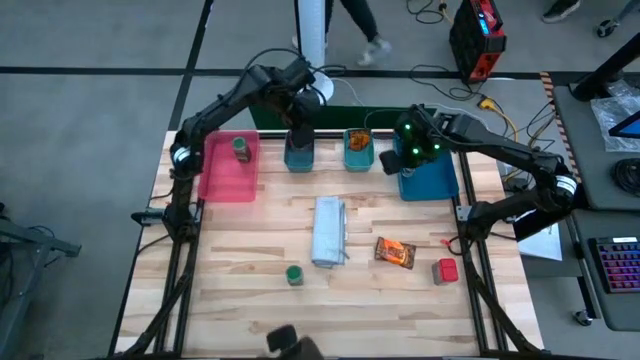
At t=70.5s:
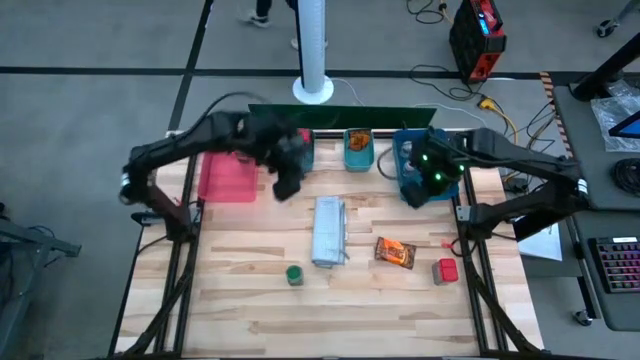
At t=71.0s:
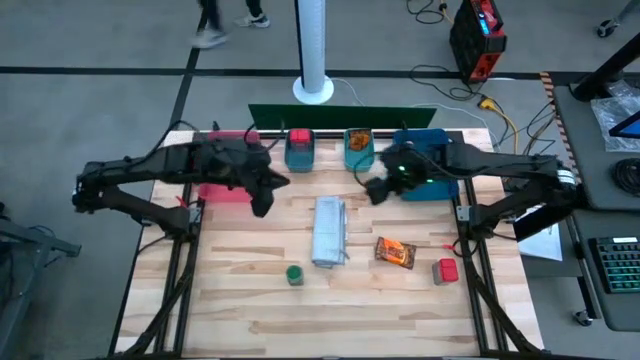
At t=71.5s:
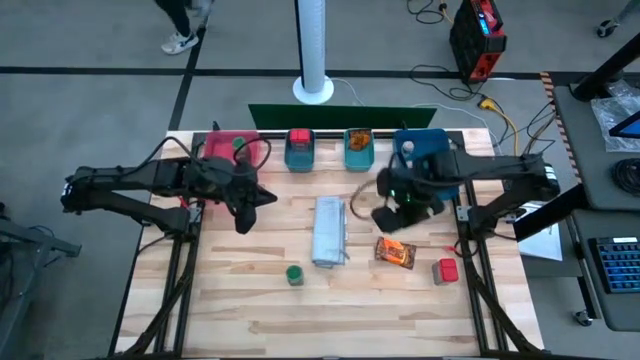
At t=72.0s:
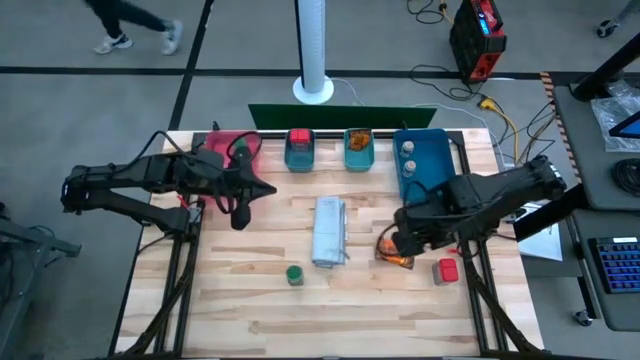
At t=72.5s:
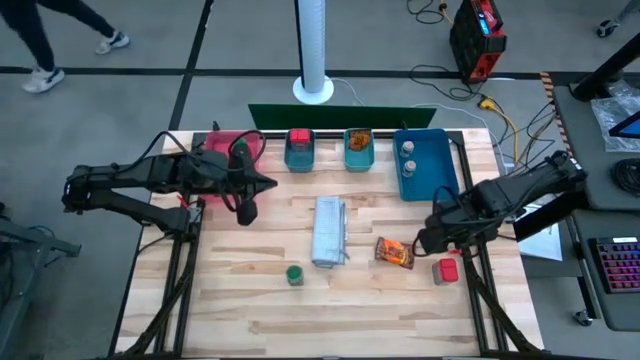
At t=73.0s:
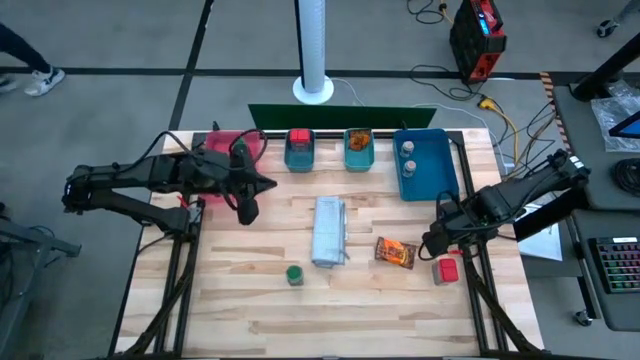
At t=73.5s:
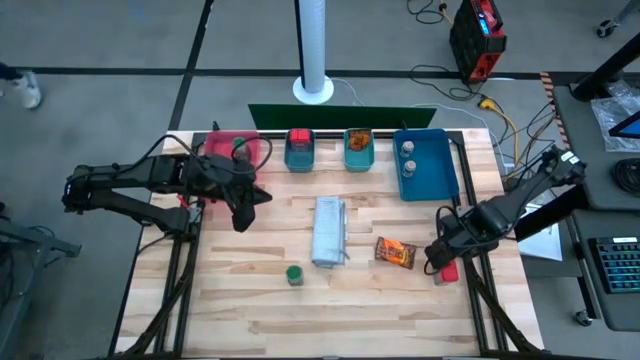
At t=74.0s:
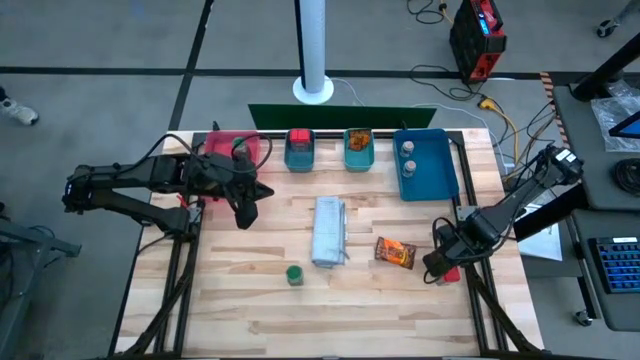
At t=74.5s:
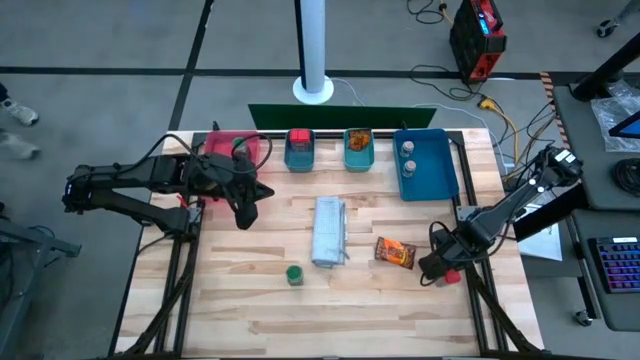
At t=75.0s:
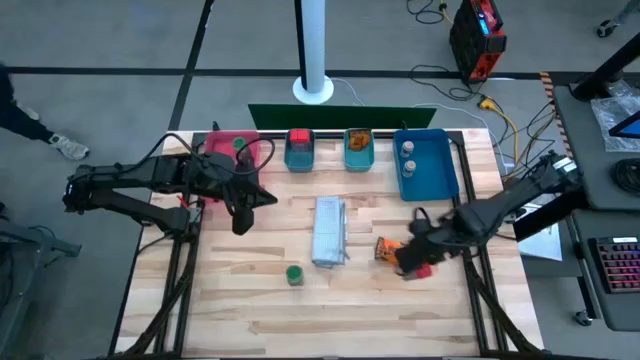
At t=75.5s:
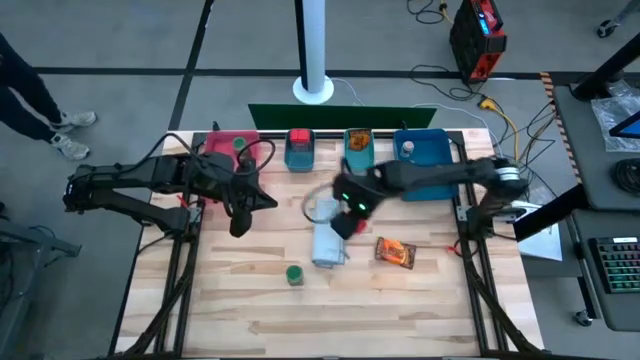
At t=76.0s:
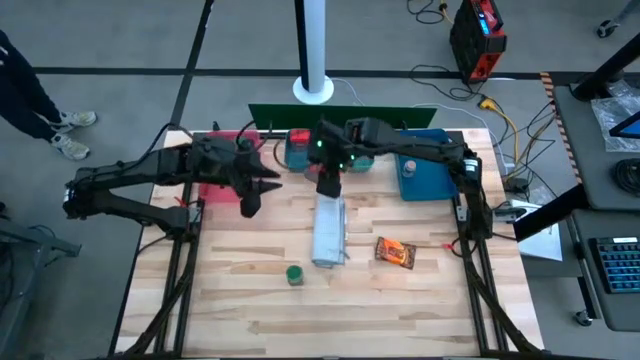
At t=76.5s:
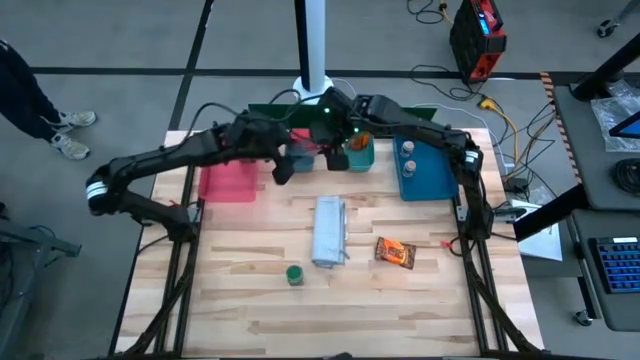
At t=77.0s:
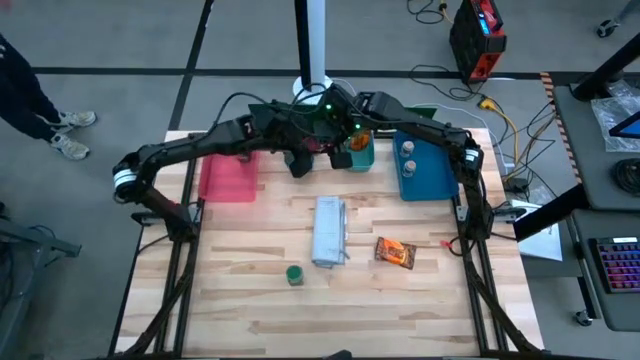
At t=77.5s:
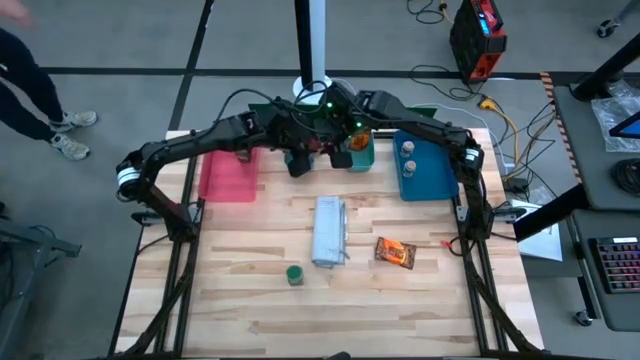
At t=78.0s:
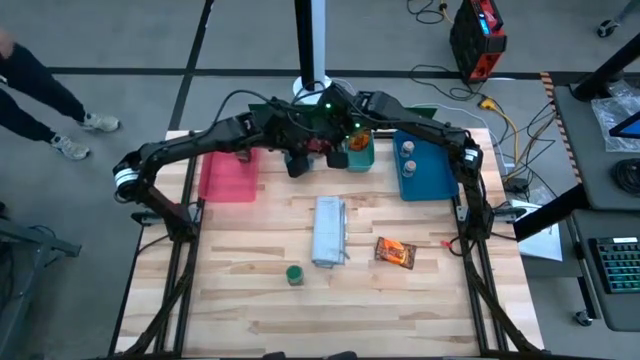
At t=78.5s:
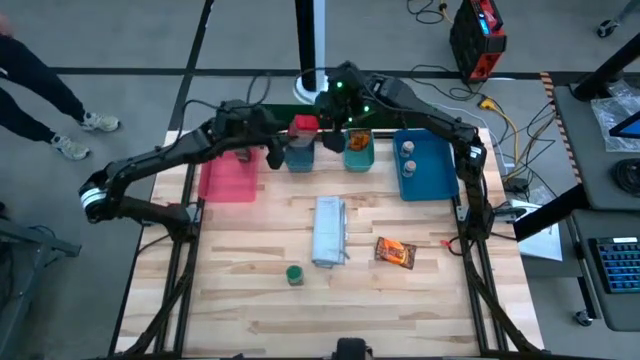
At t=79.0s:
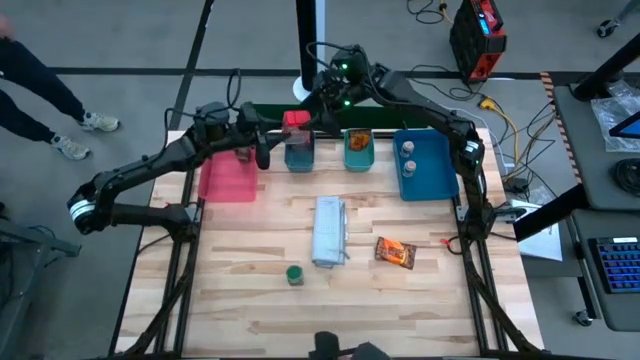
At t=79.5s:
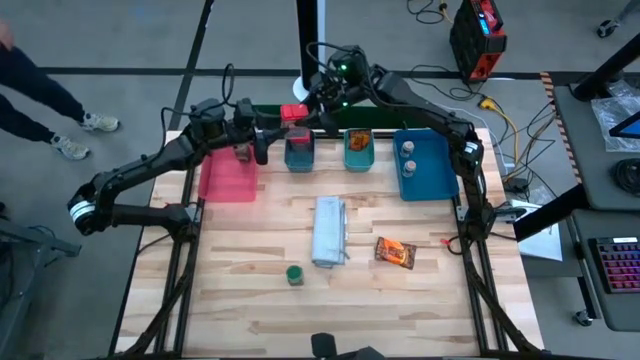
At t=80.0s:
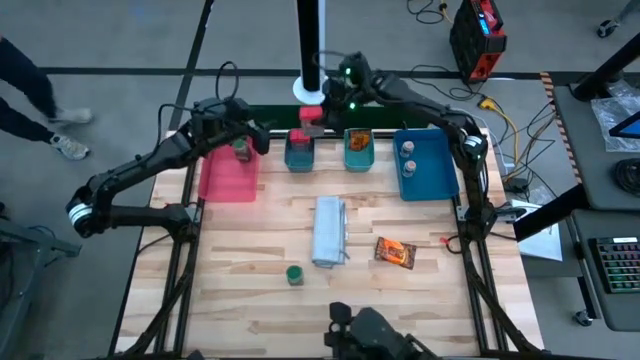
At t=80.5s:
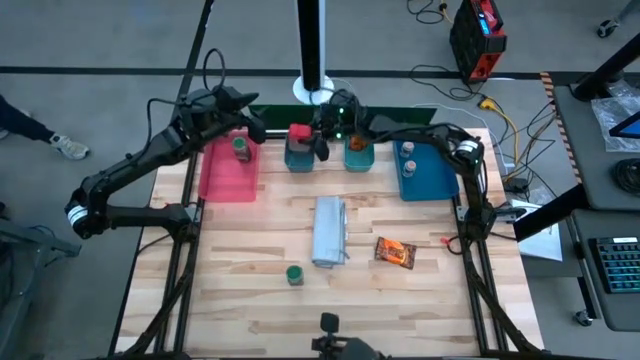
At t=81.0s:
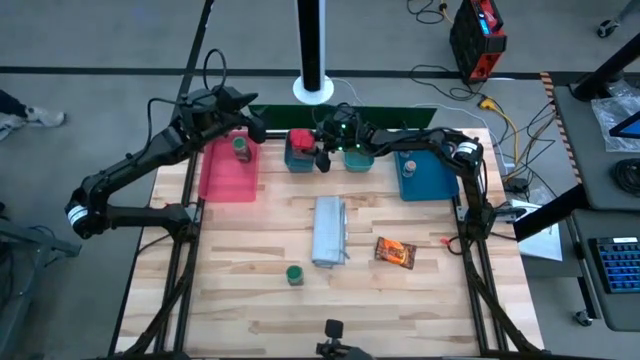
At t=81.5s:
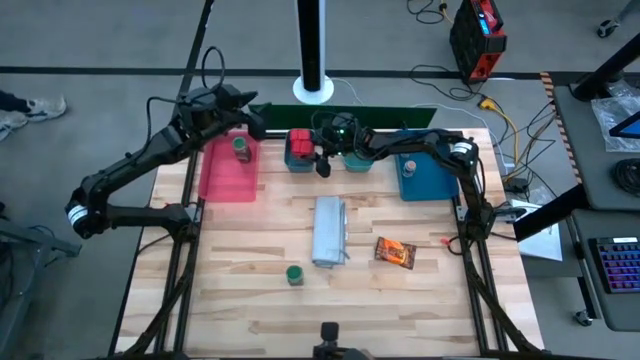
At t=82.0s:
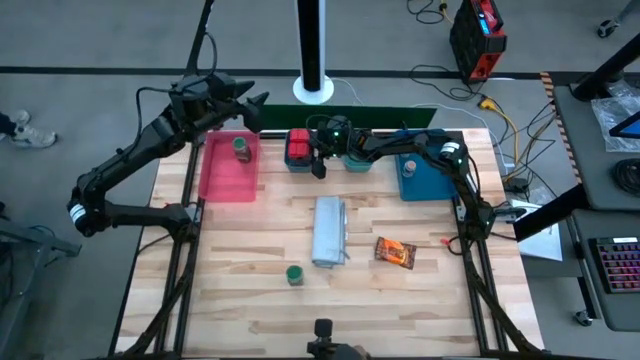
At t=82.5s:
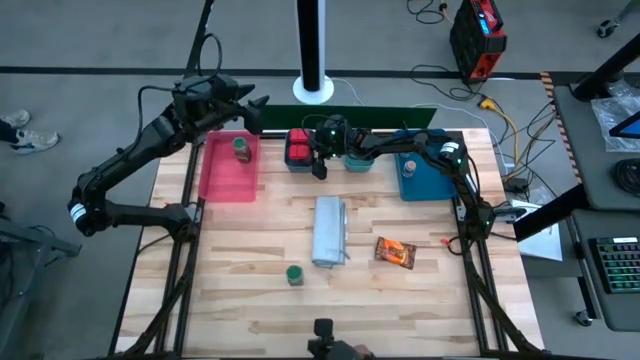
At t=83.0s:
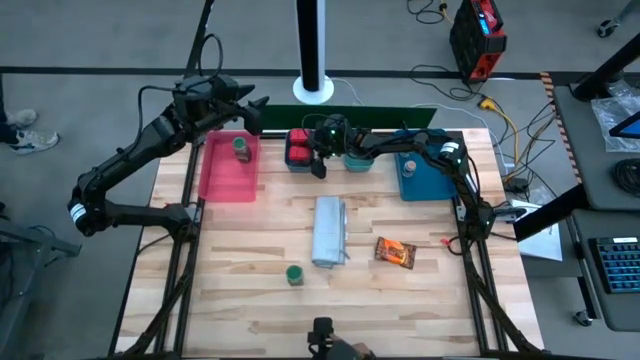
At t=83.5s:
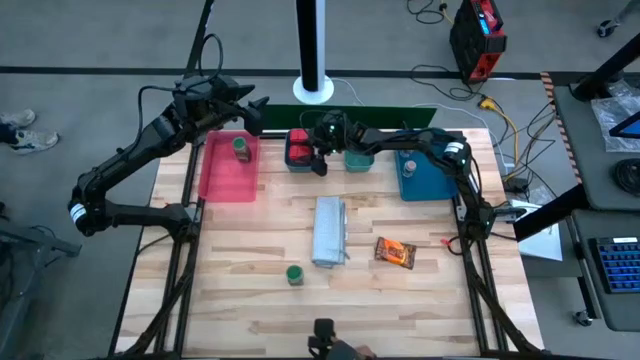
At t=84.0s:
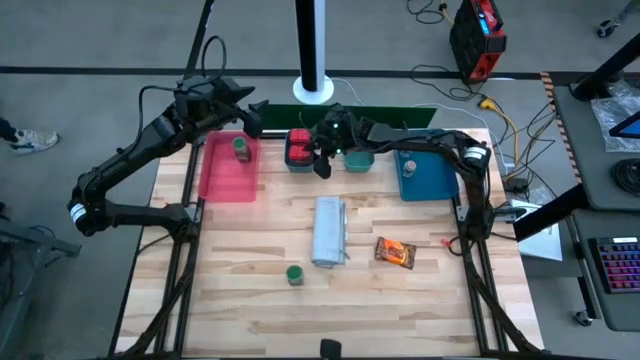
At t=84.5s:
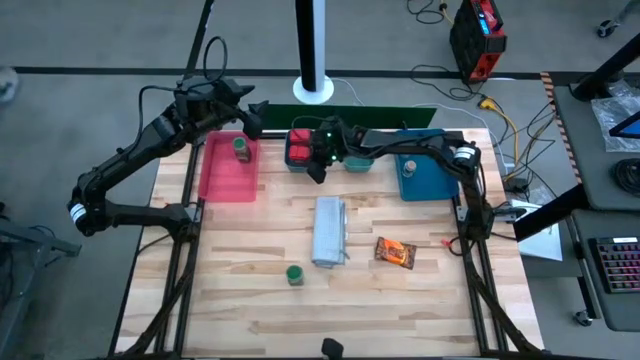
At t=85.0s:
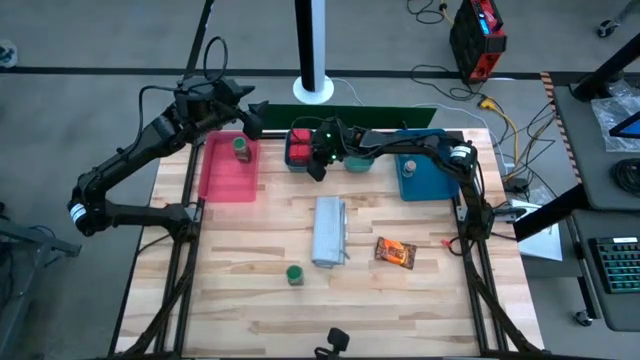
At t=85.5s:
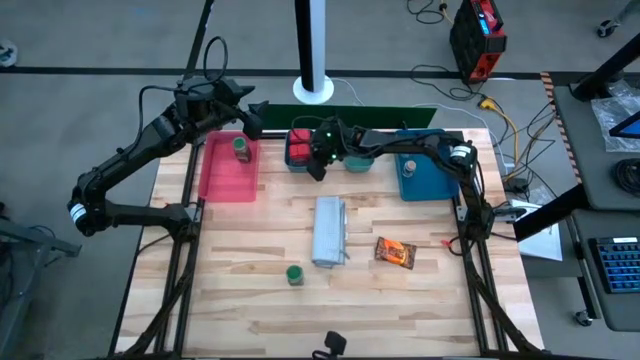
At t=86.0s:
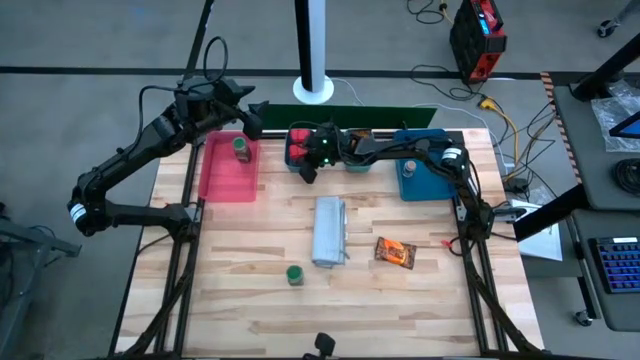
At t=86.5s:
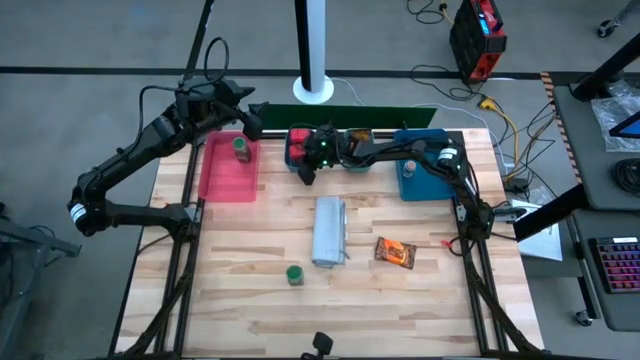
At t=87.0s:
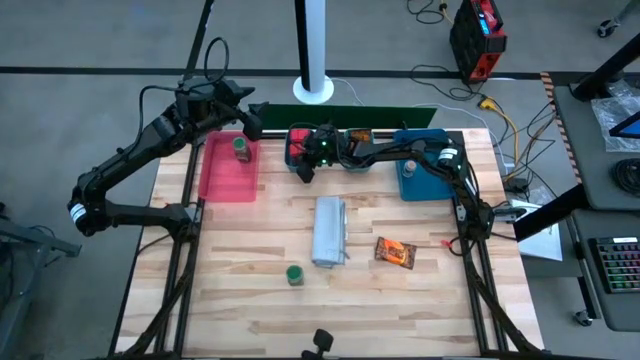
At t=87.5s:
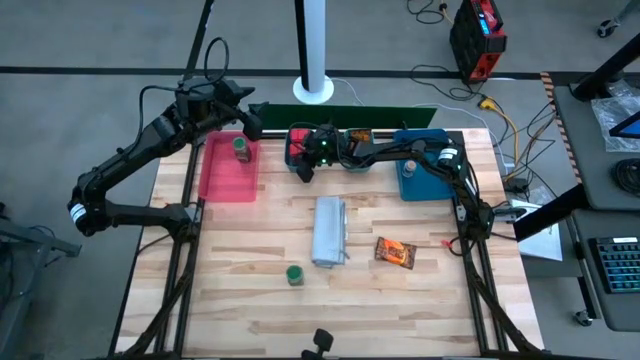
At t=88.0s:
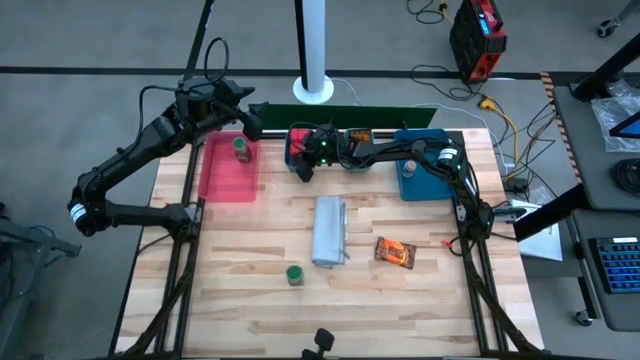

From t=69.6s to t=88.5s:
Task: Sort spices by type
Put the red seasoning can into the dark green bin

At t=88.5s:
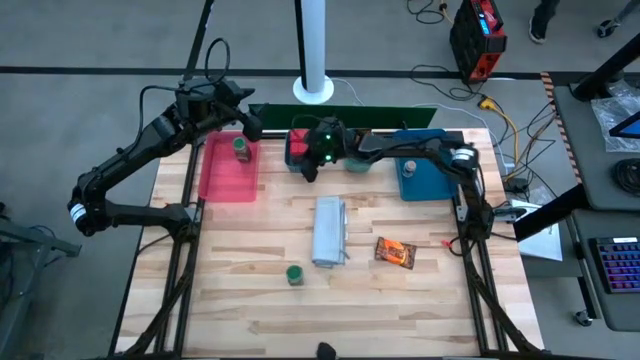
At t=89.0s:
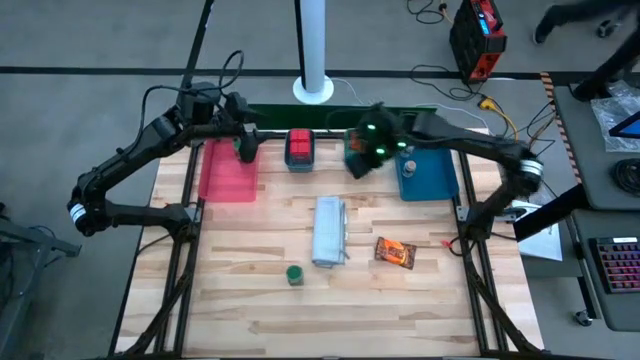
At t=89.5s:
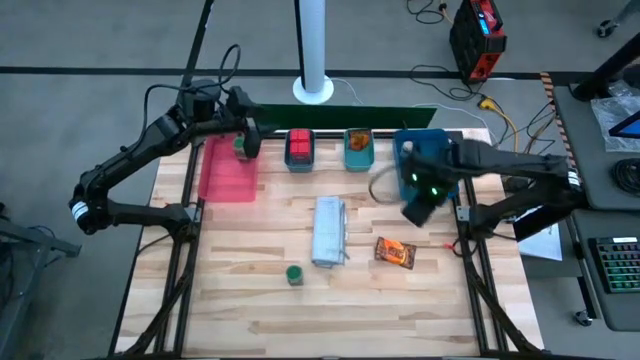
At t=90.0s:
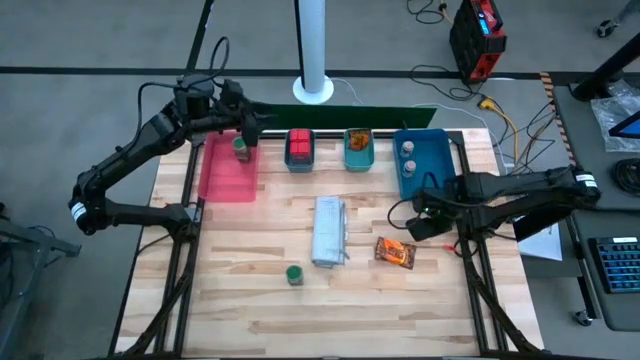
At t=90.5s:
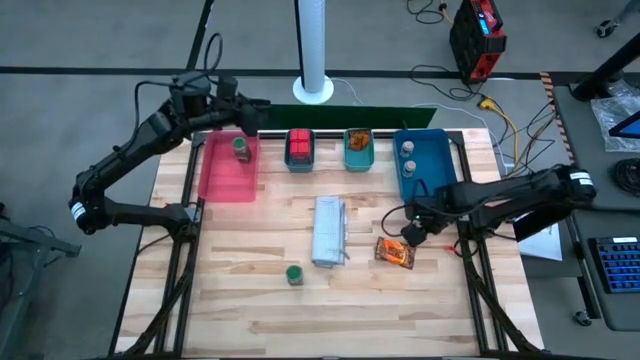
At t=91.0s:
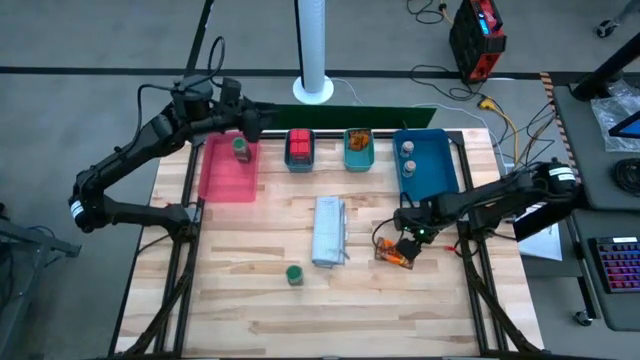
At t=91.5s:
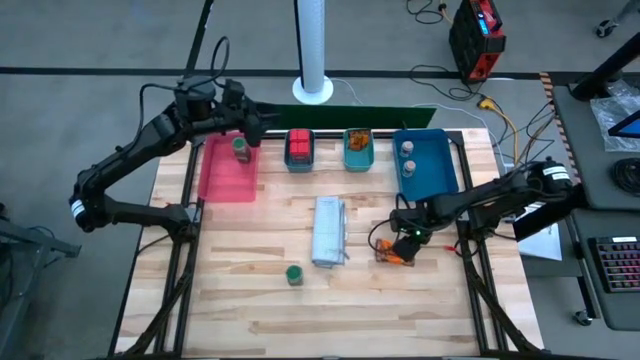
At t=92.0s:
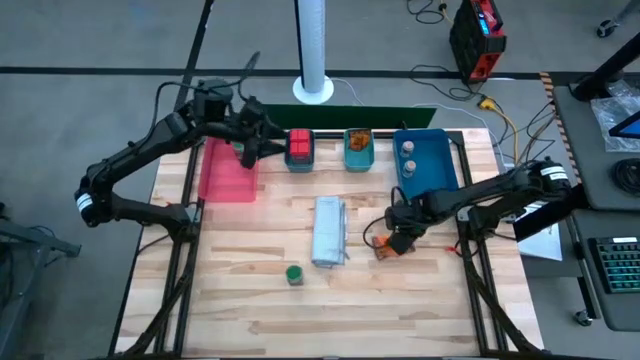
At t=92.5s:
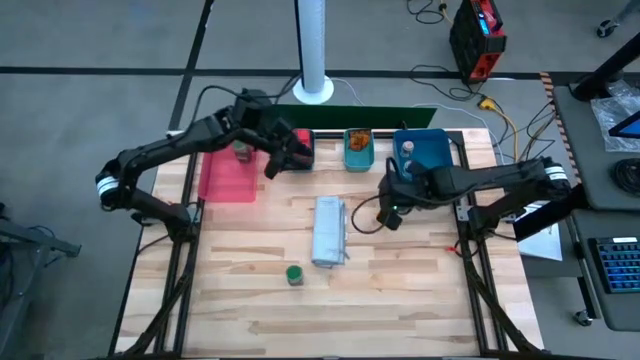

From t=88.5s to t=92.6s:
Put the orange seasoning pack into the green bin
